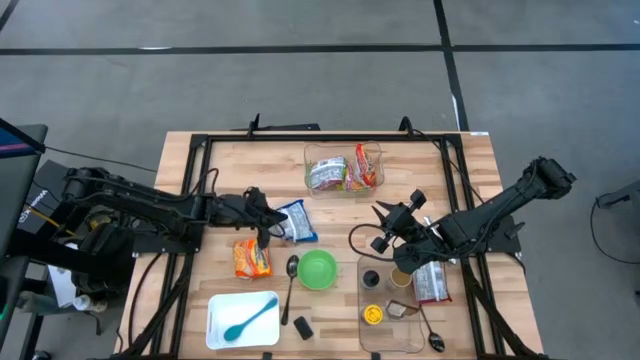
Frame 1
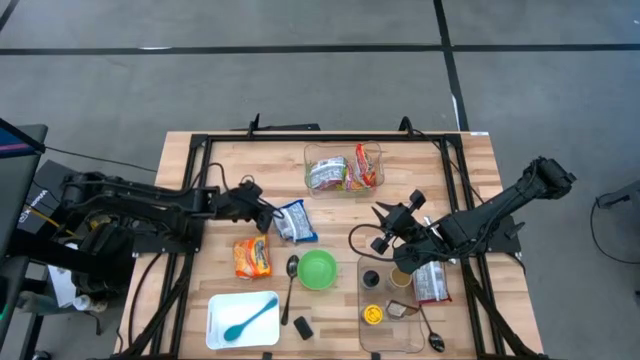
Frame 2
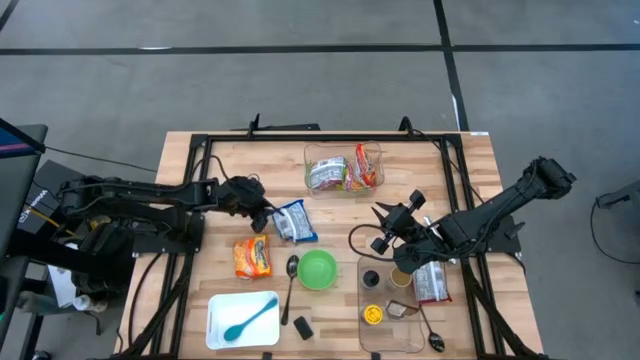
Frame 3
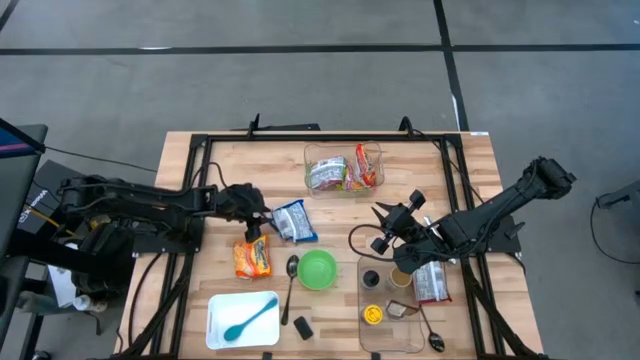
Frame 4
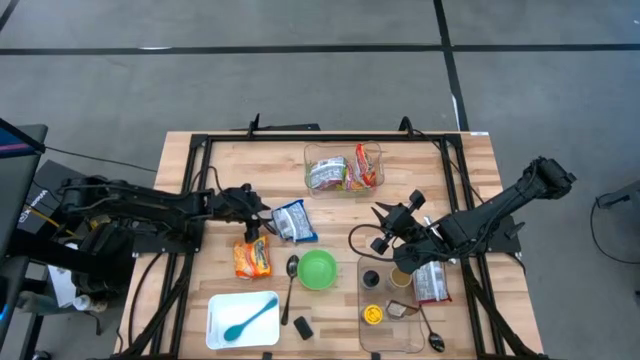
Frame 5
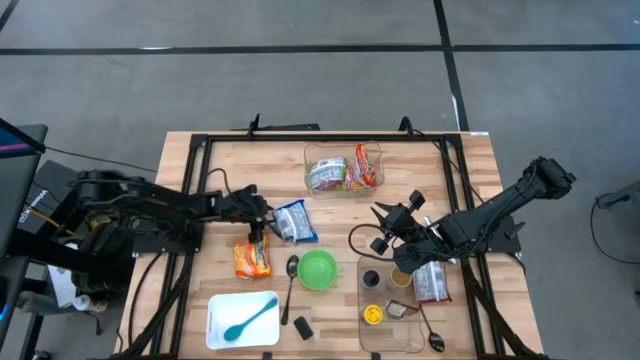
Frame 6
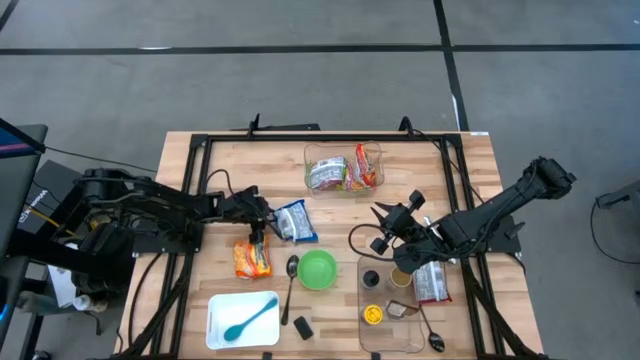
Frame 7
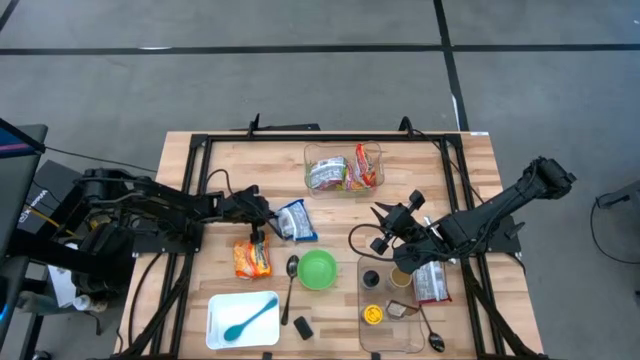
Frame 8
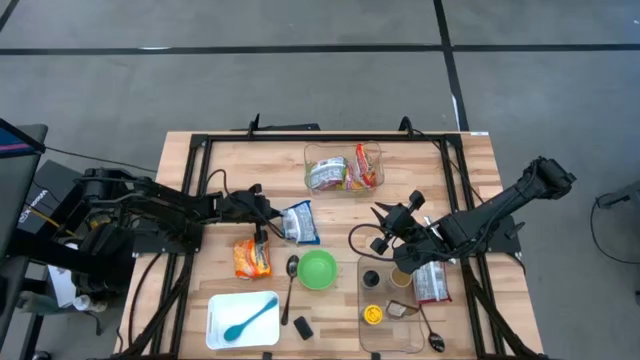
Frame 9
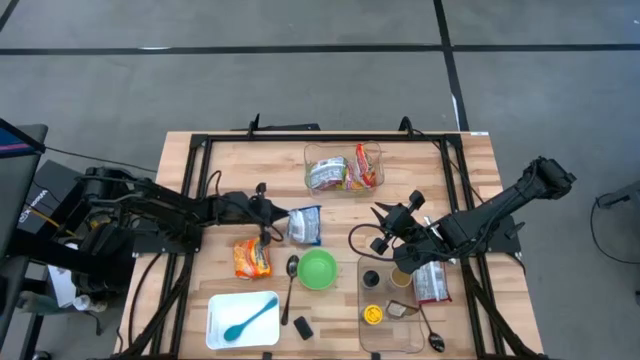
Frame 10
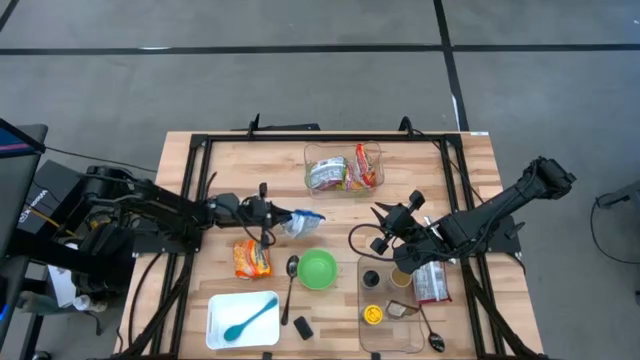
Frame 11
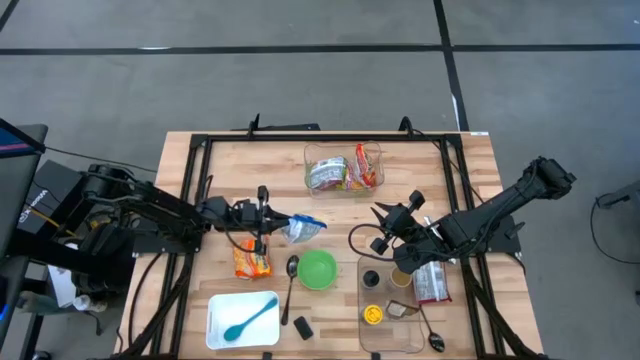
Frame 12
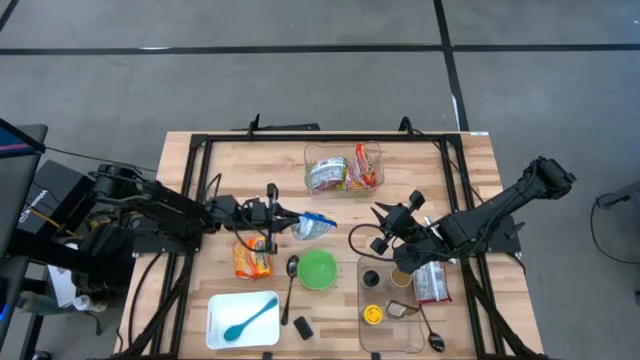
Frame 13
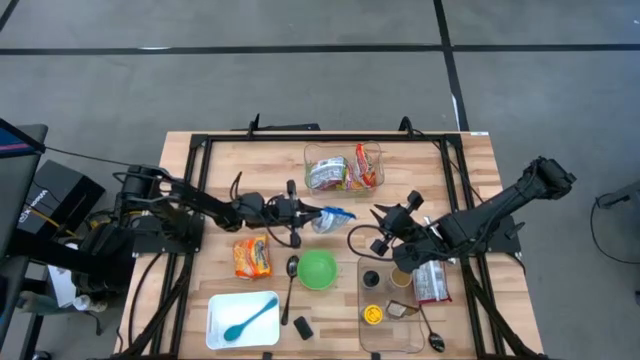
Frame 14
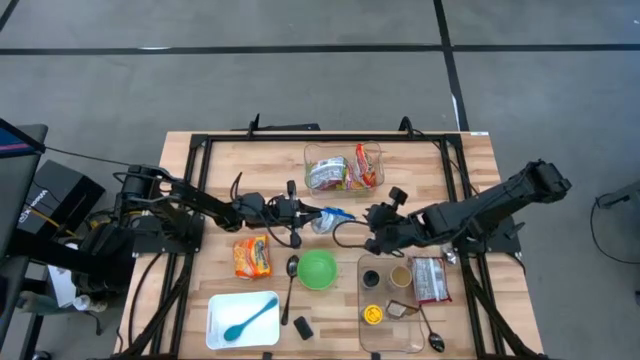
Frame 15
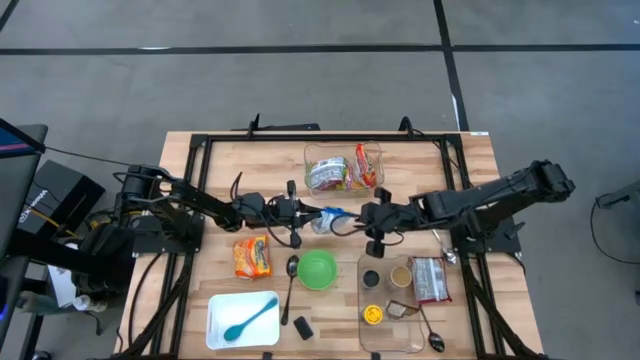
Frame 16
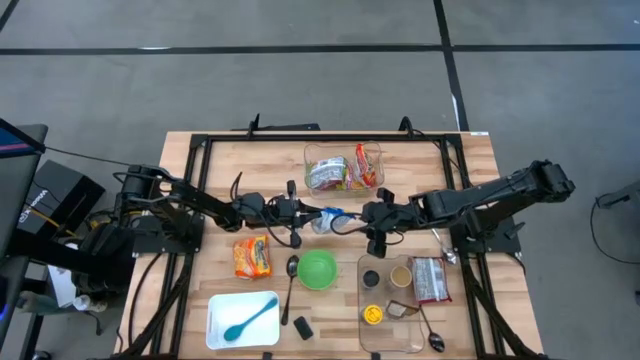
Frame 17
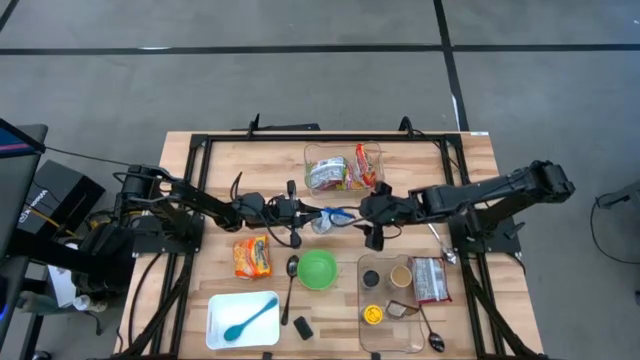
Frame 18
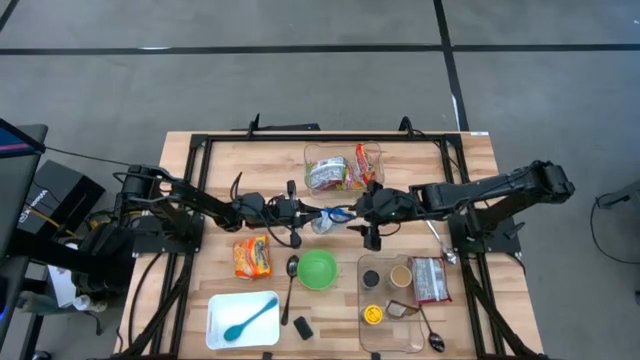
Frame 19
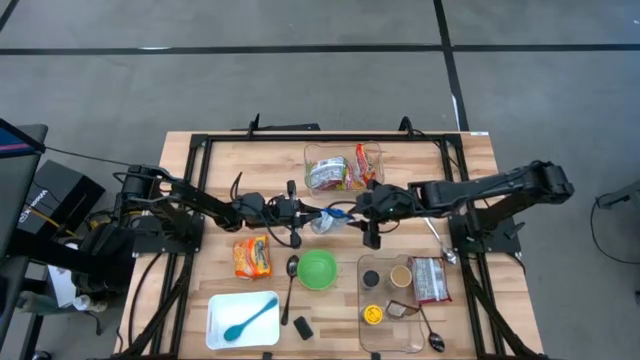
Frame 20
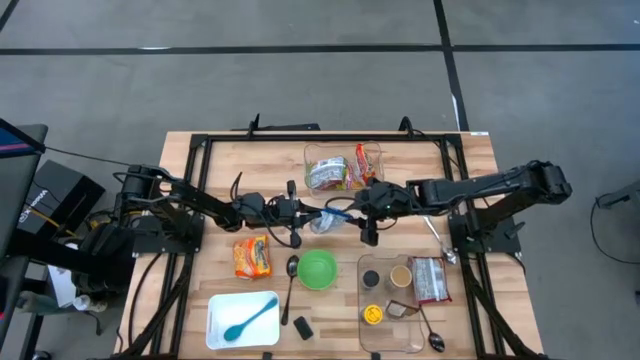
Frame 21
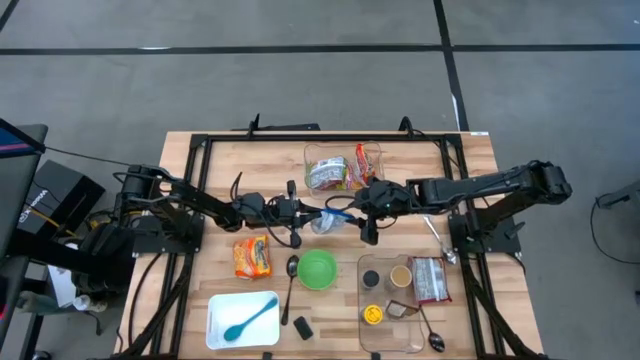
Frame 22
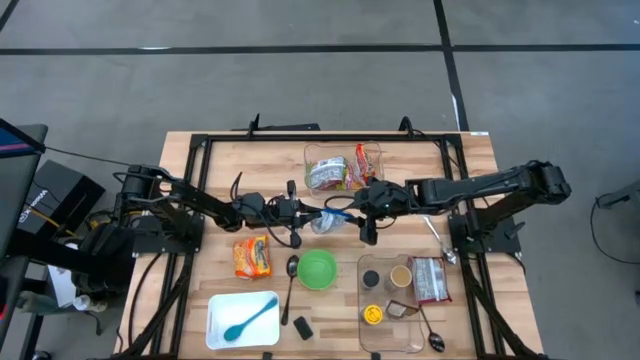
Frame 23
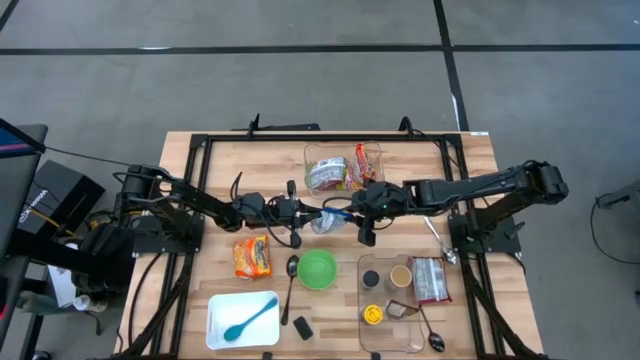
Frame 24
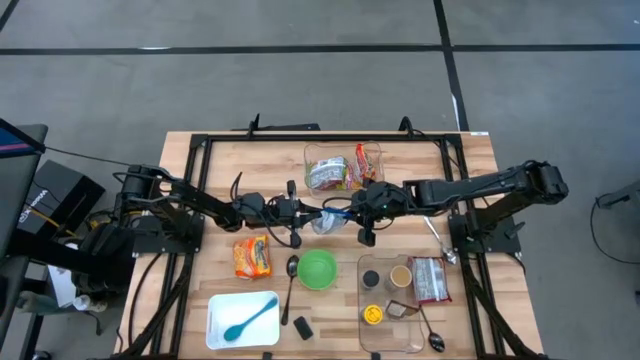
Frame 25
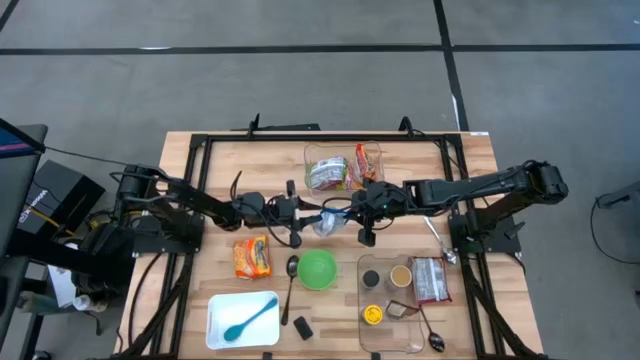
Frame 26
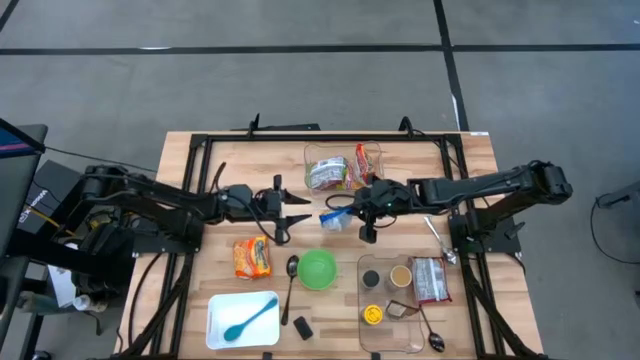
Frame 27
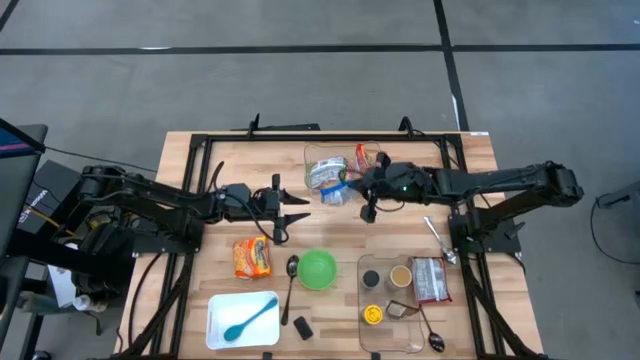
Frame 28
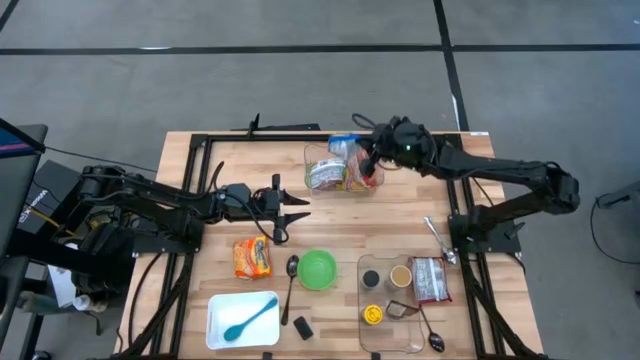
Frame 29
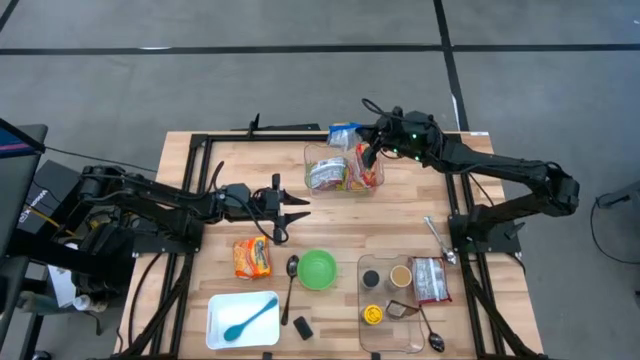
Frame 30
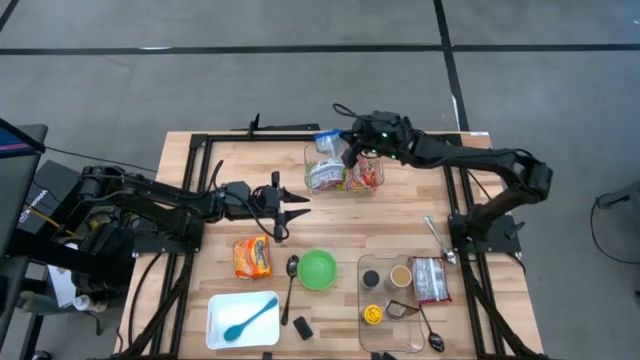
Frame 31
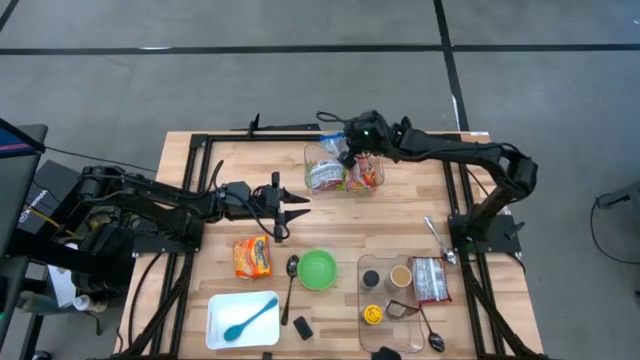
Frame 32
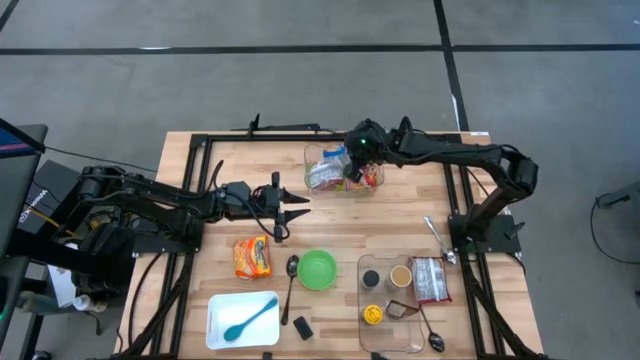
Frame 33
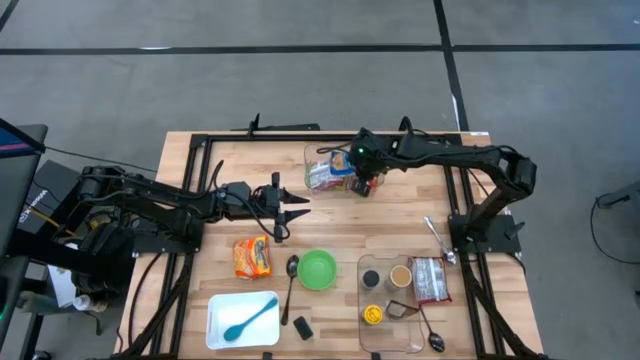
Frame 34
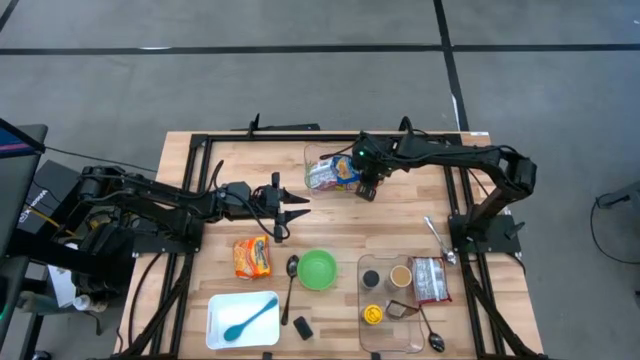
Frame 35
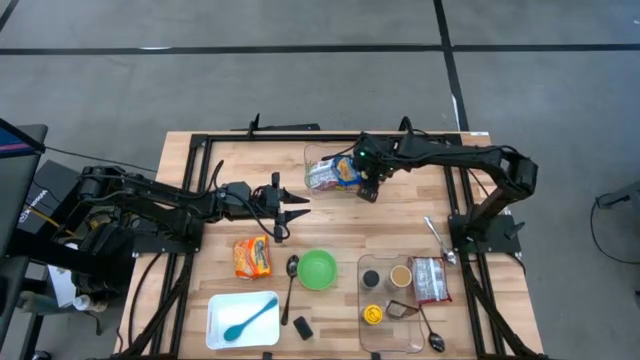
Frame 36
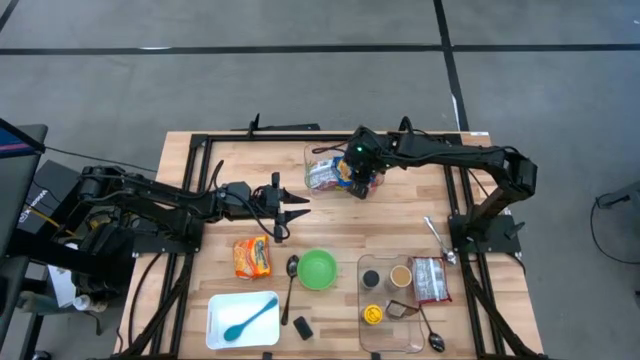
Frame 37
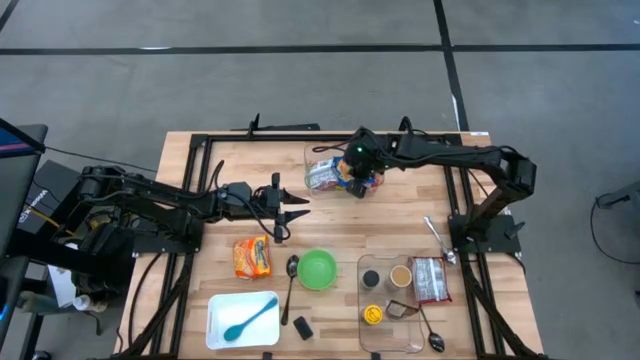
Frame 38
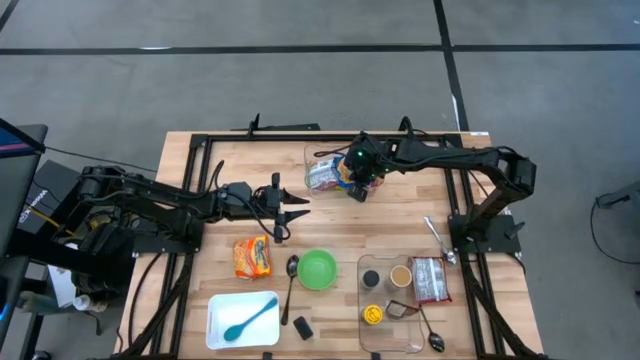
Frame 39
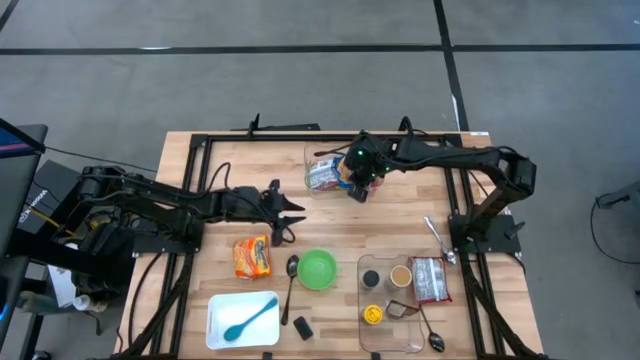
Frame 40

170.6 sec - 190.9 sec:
Task: Pick & Place Food Item
Put the blue noodle pack into the top transparent bin

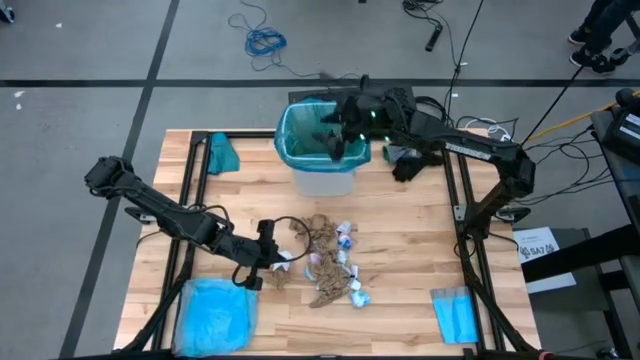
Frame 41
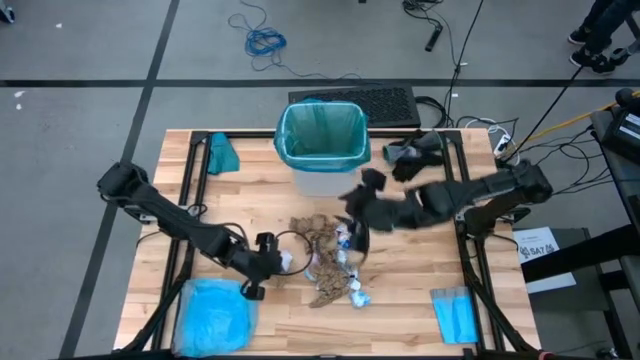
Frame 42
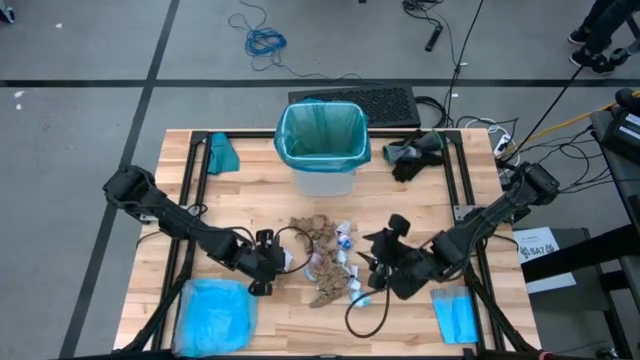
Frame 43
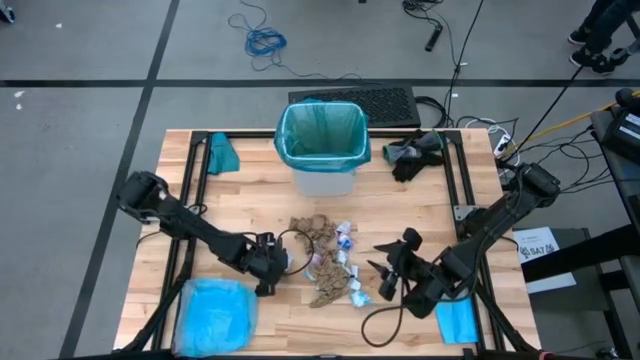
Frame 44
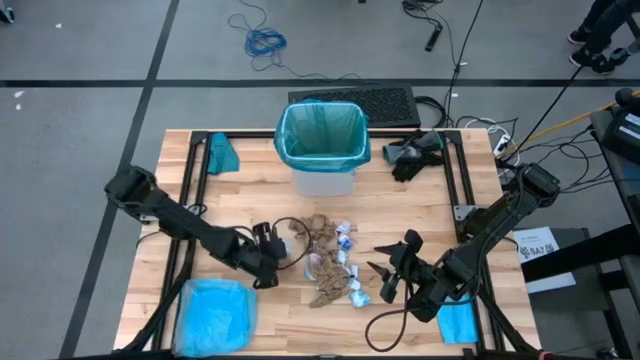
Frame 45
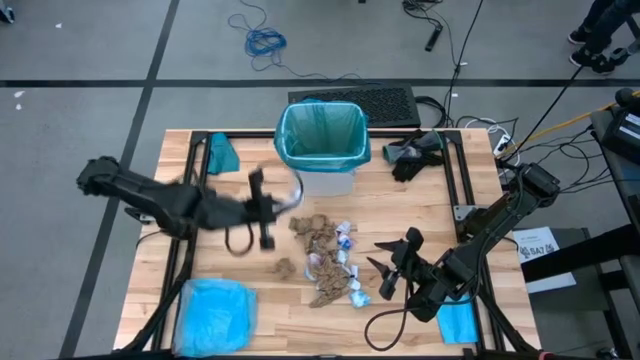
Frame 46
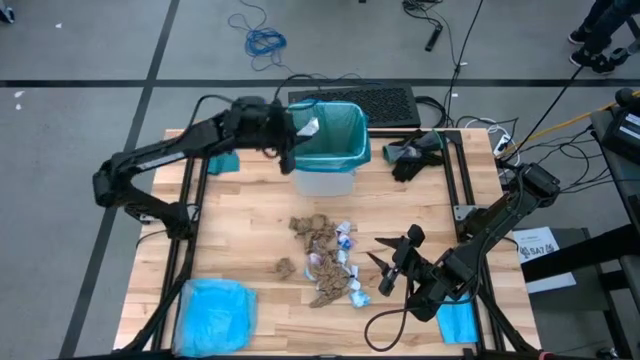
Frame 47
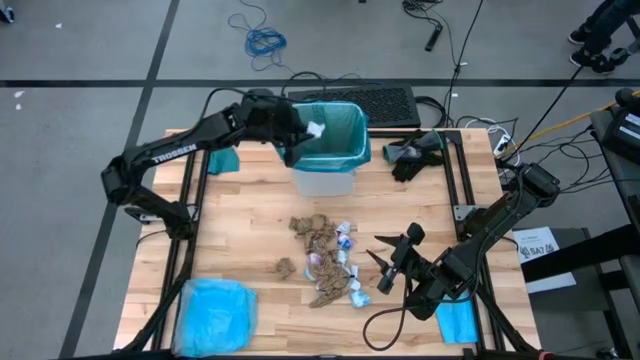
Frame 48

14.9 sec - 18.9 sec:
Task: place trash/remove bag and relplace
Put the white paper into the trash bin
